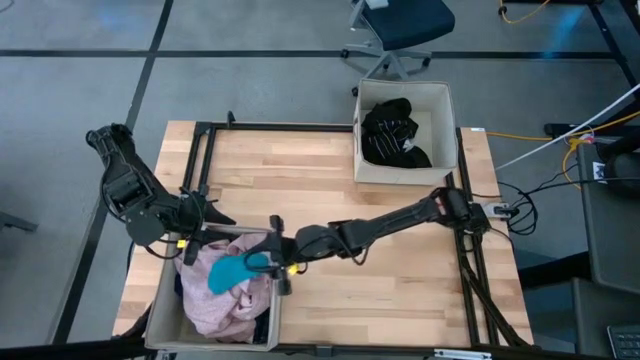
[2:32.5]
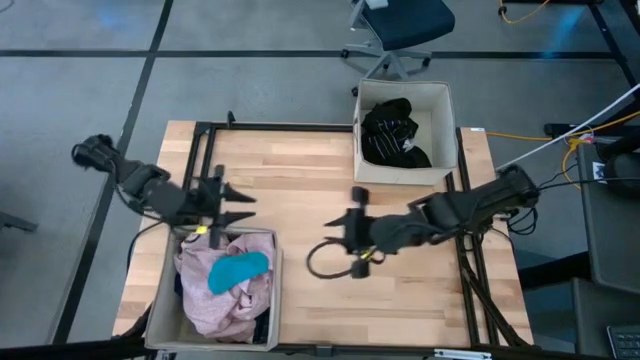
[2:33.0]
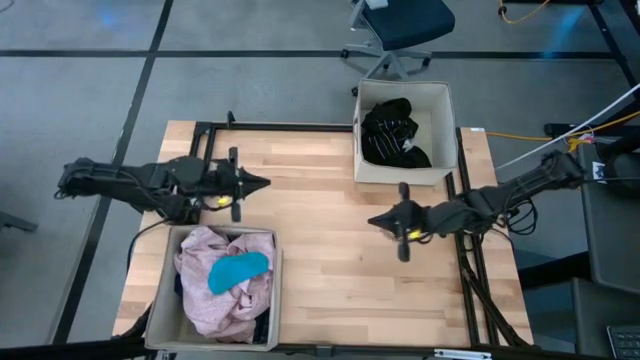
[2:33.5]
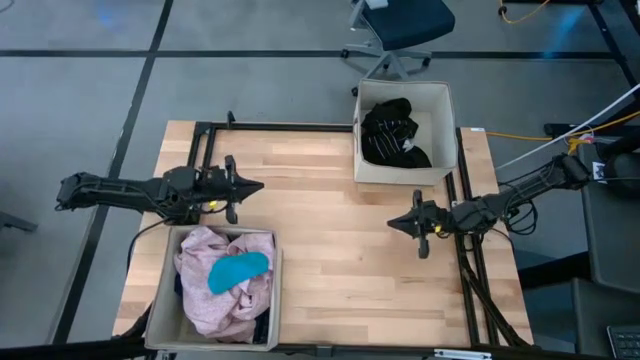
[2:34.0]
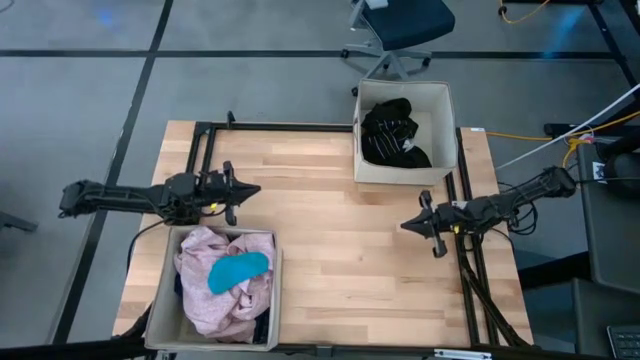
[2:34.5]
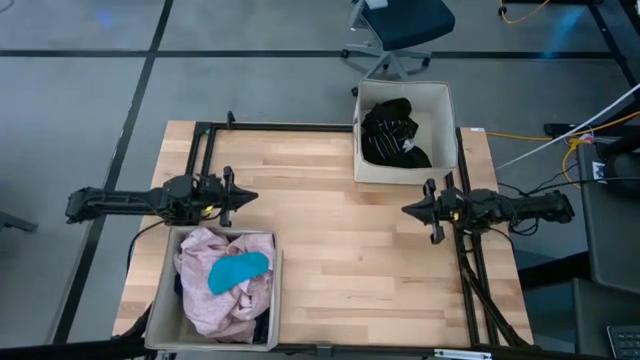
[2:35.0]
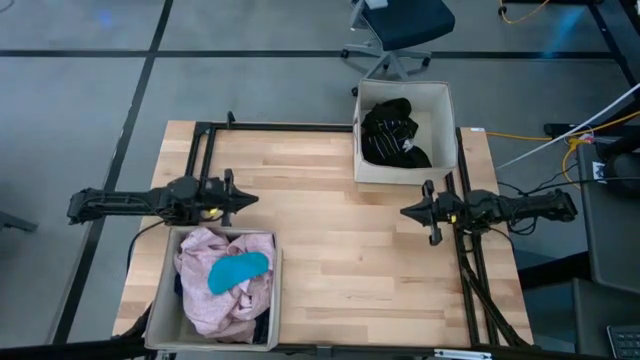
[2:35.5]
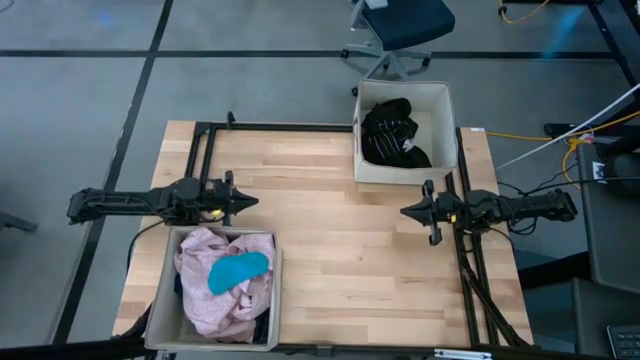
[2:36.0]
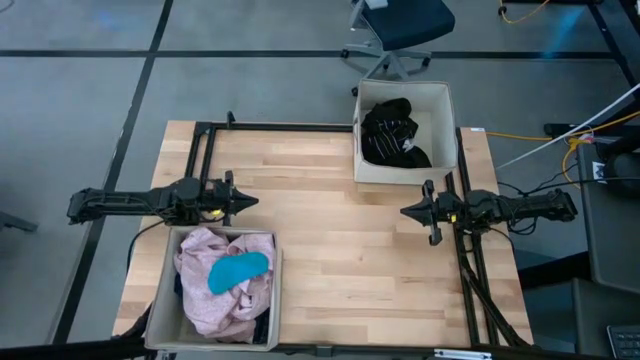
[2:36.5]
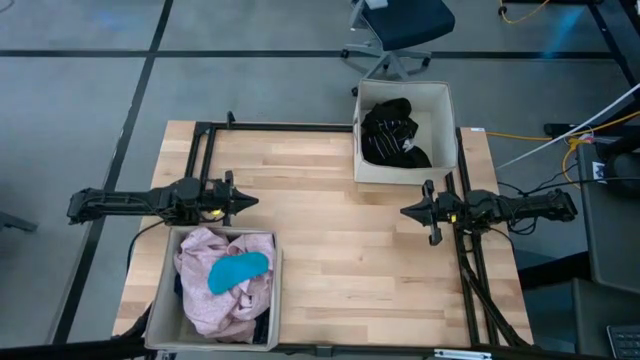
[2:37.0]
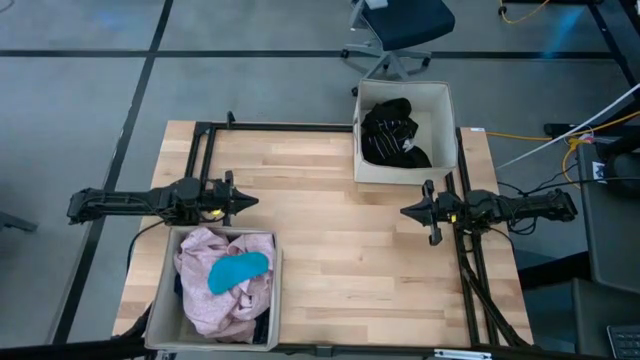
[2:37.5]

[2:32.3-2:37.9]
Task: Sort clothes
Return to Home Position

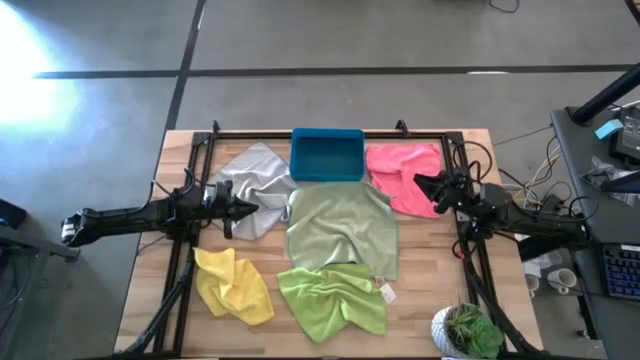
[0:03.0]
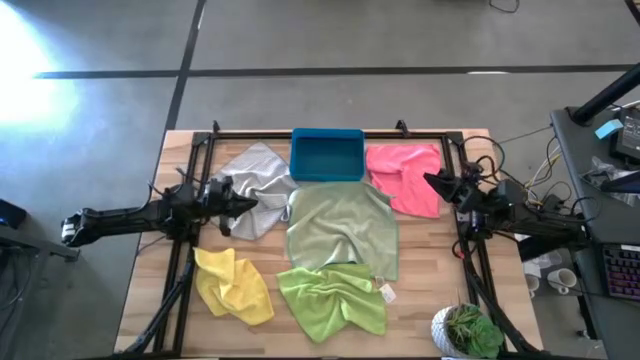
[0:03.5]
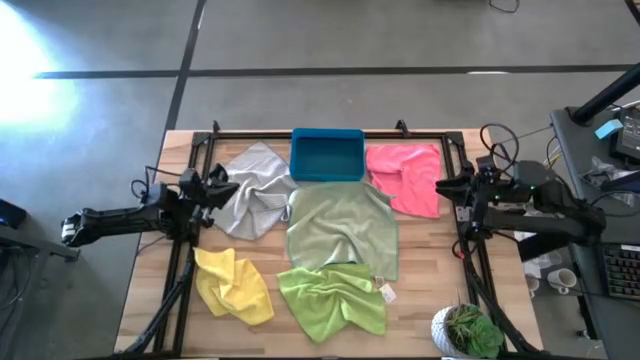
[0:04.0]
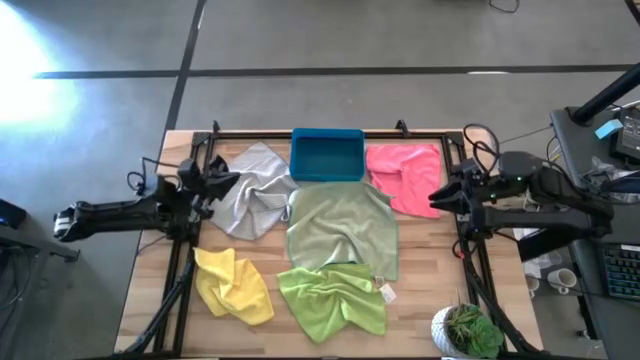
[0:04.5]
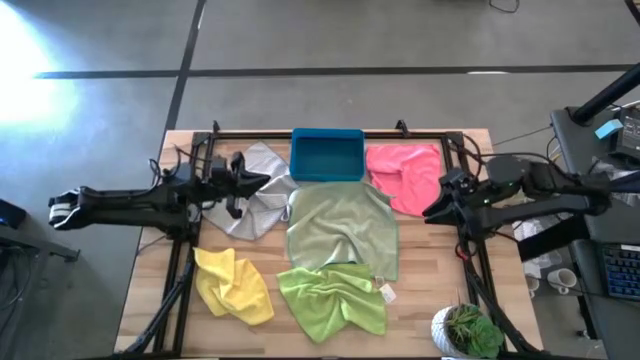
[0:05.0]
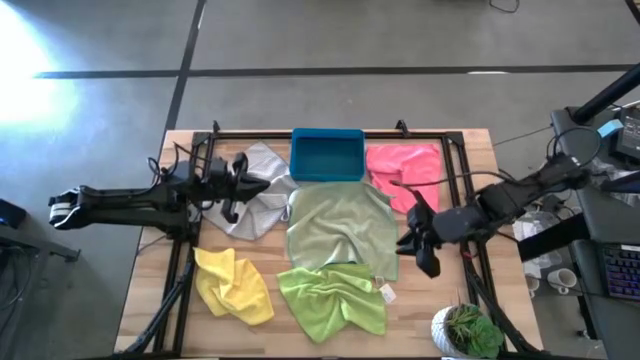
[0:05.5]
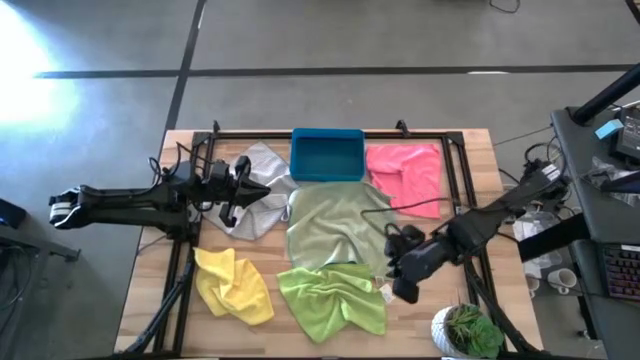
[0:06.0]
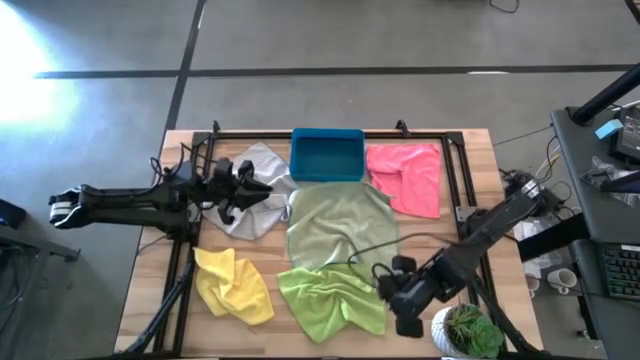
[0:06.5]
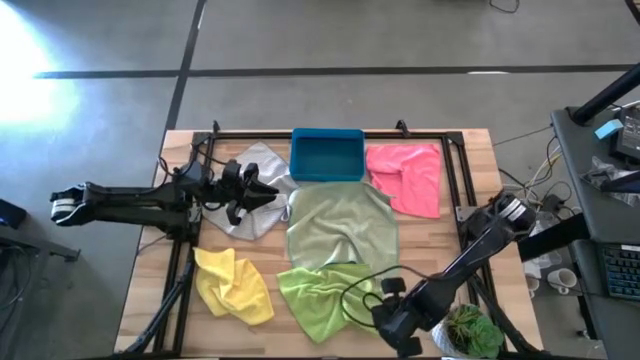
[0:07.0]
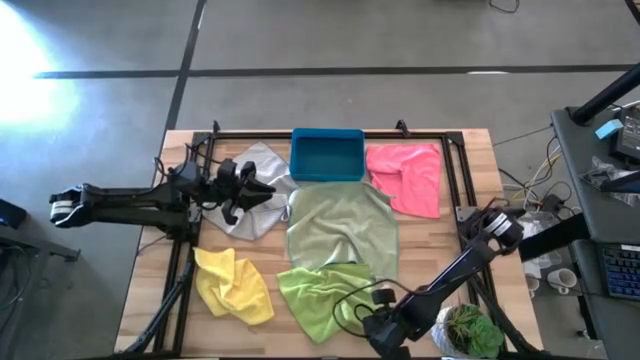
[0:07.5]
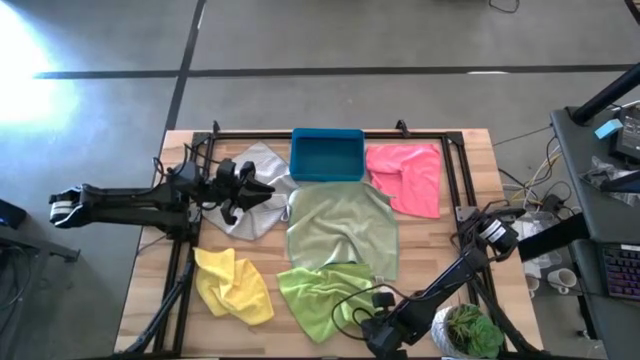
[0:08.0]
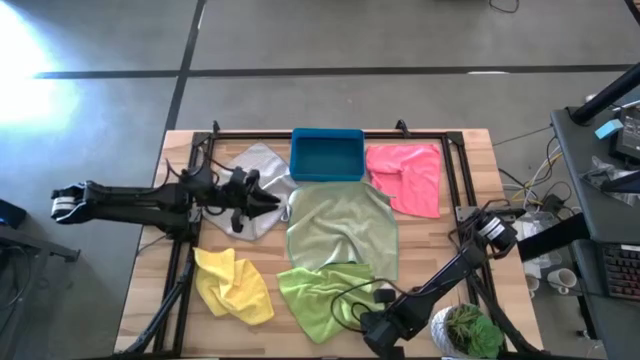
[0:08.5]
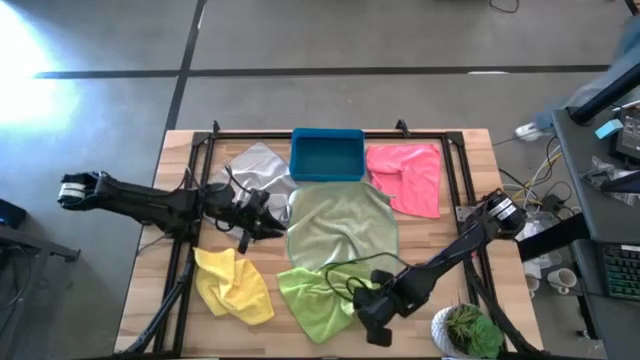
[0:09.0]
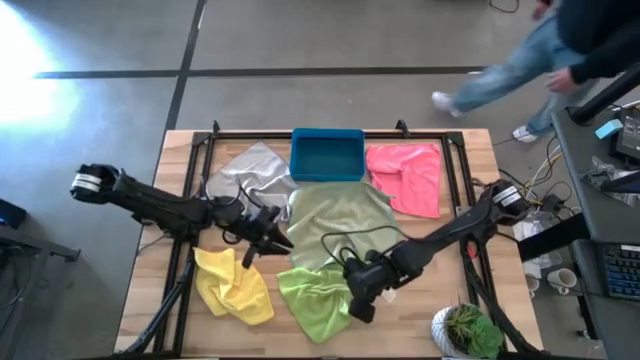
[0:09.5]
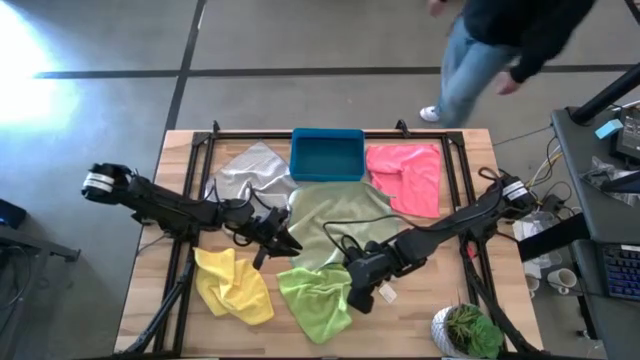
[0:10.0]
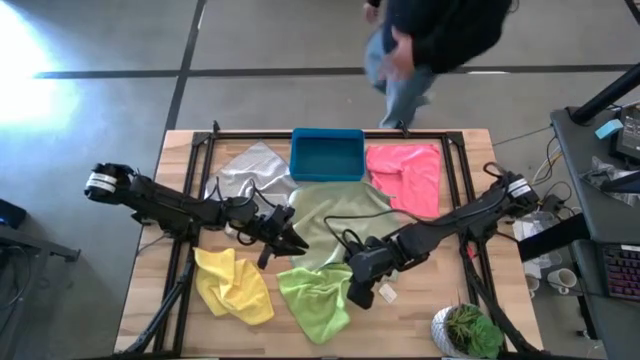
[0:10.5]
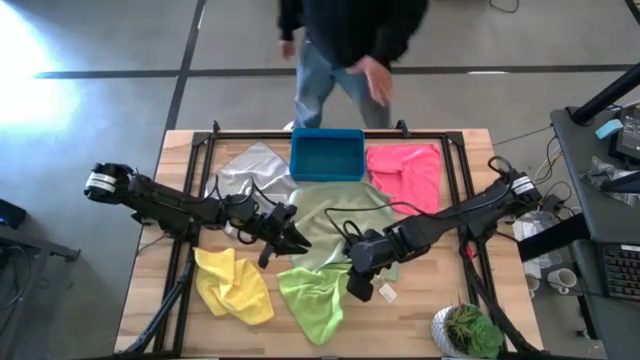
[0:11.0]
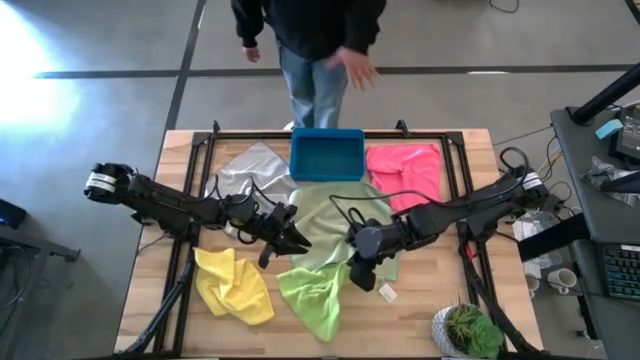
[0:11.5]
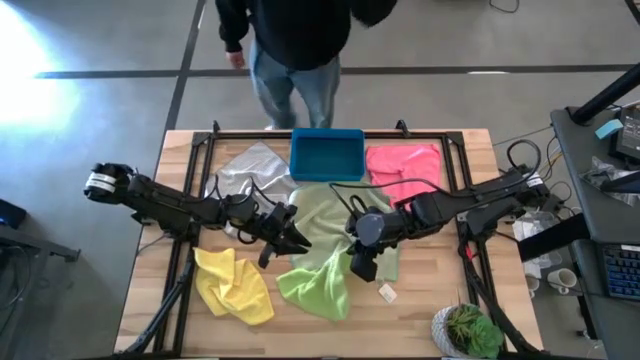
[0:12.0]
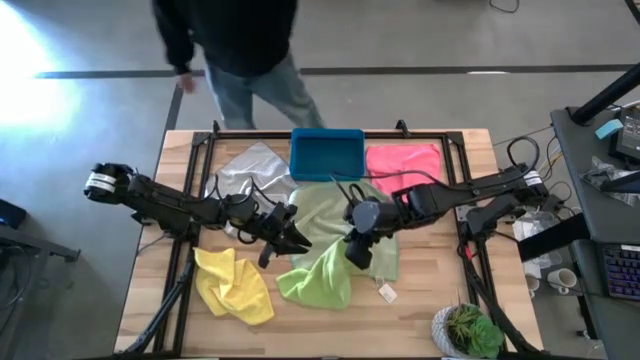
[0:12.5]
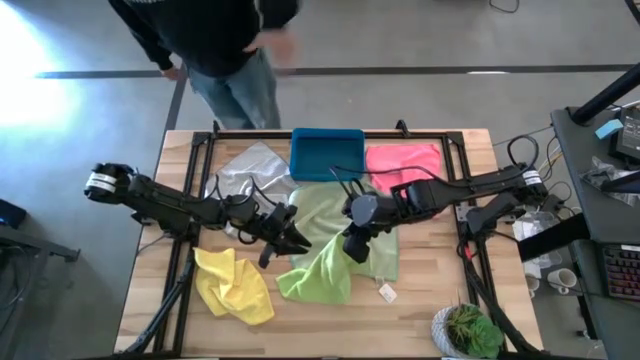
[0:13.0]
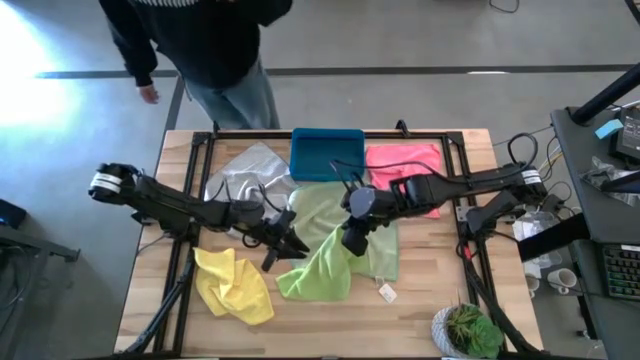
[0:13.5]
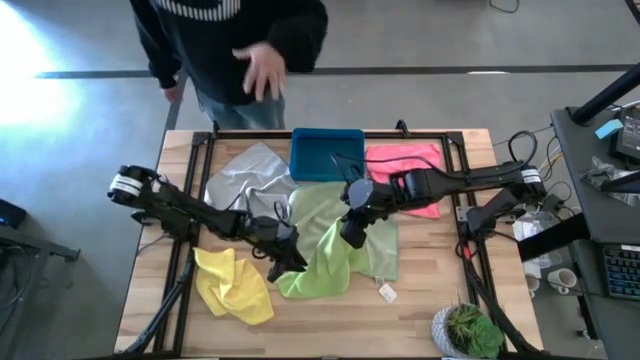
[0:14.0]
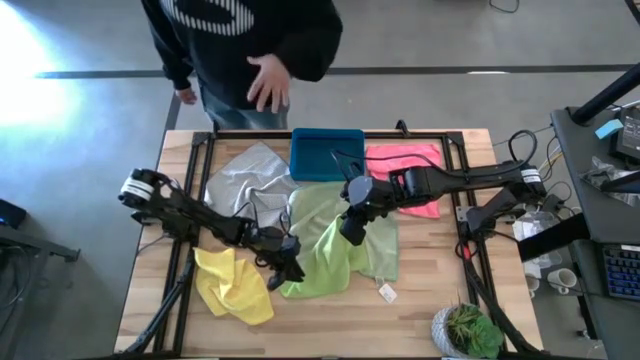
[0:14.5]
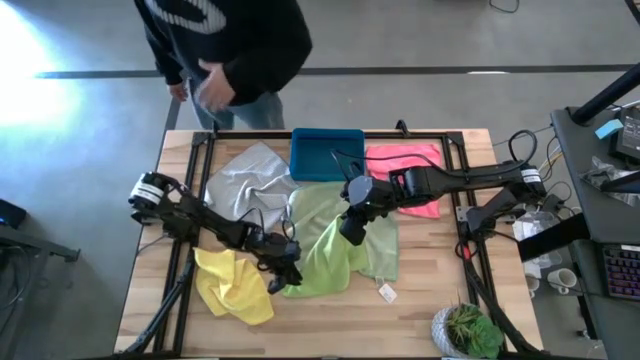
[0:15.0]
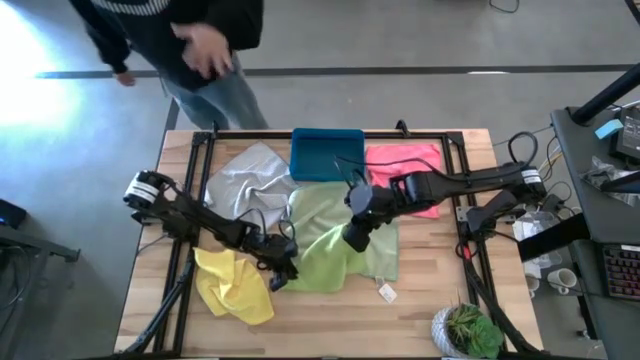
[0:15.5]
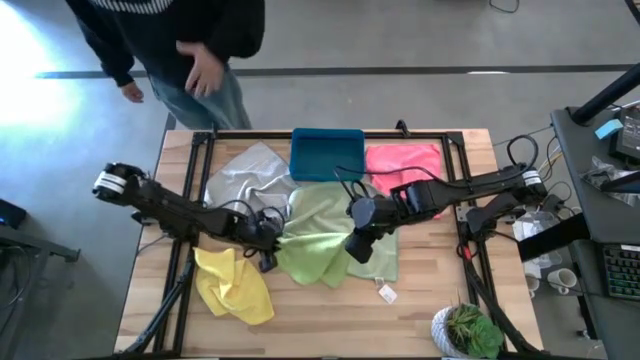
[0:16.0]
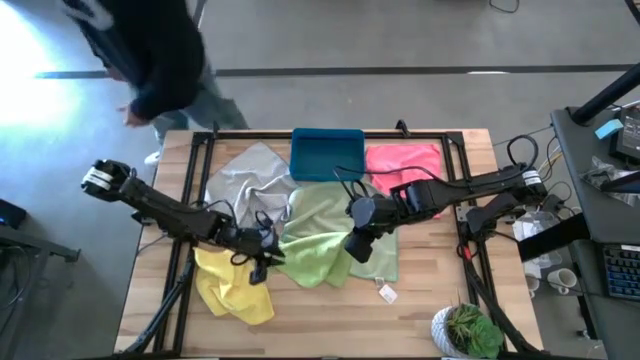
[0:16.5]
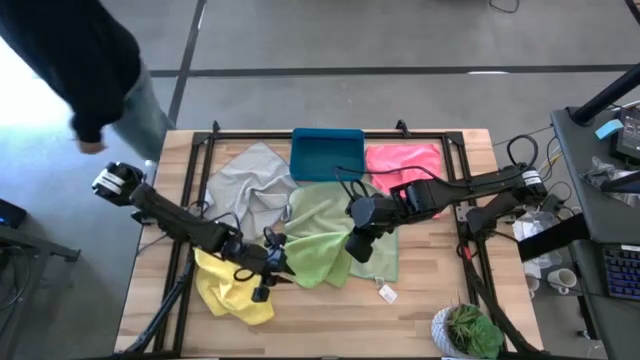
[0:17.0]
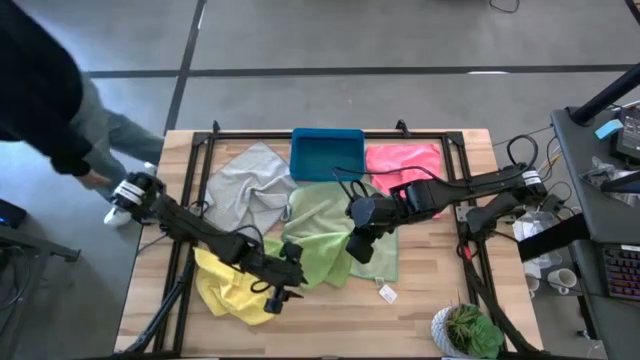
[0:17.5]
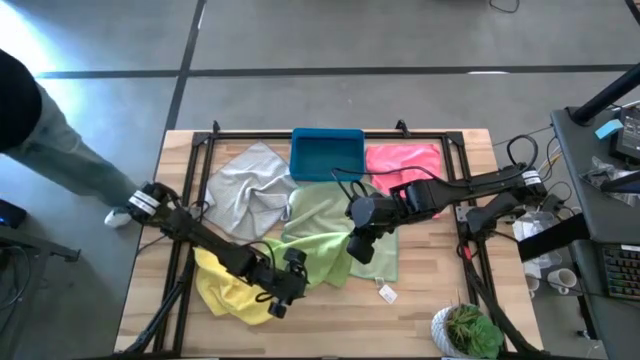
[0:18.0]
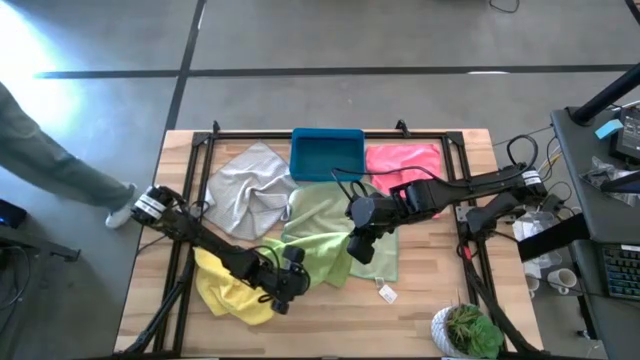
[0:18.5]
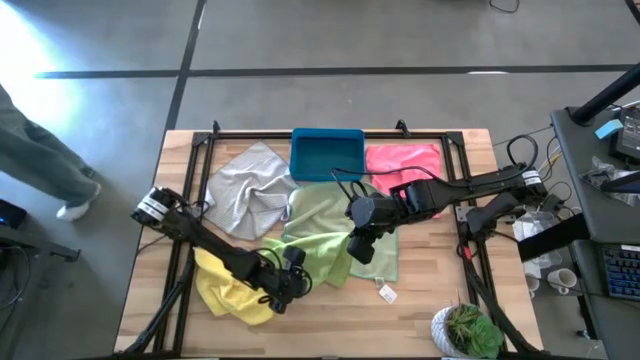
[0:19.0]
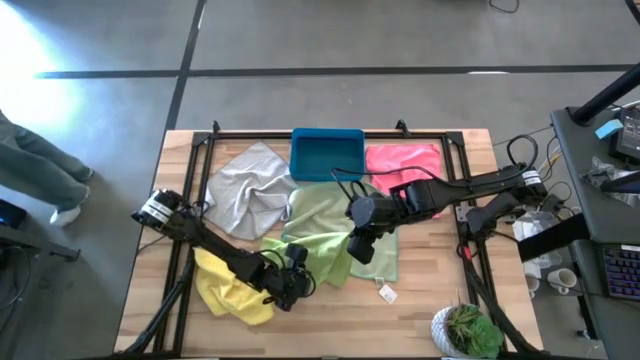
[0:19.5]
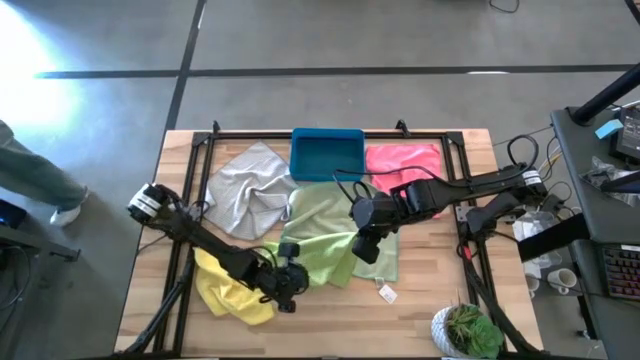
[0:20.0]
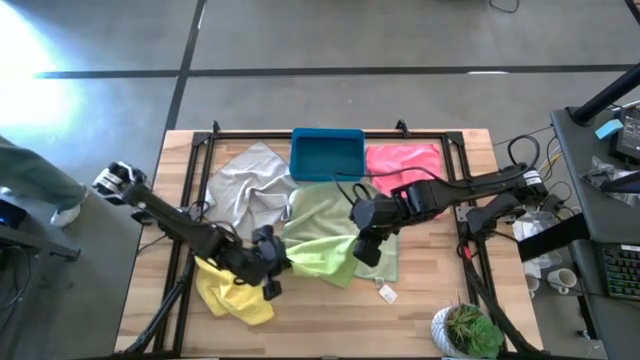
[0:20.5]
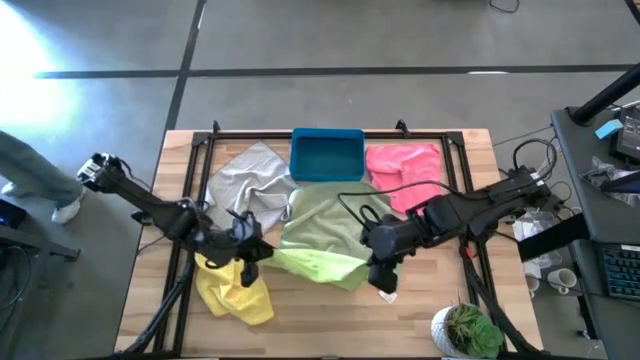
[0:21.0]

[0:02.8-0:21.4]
Task: Fold microfiber towels
Fold the light green microfiber cloth
